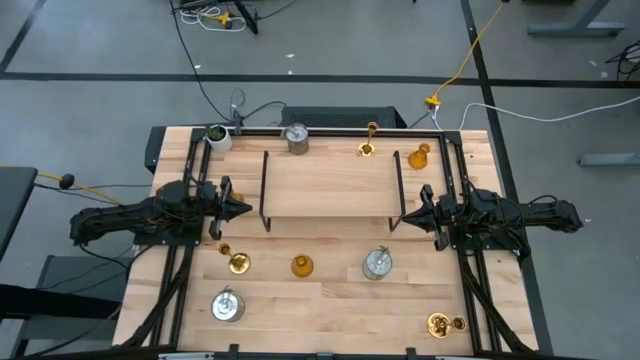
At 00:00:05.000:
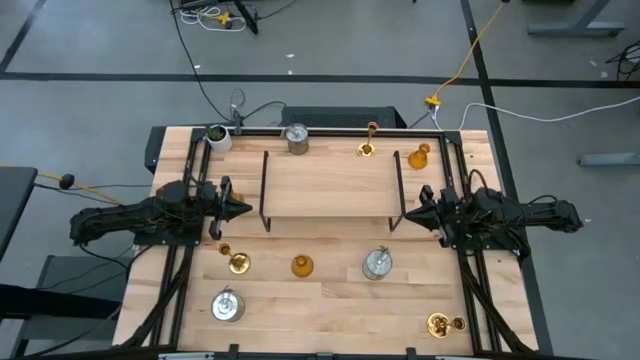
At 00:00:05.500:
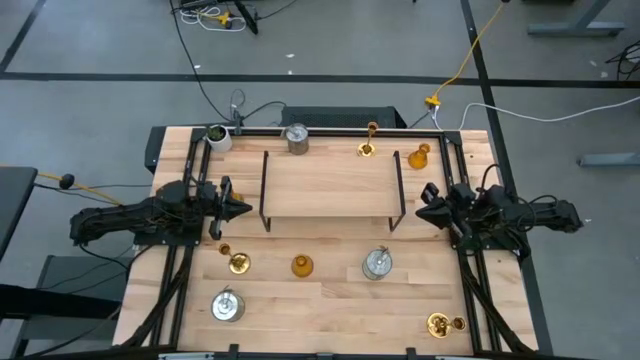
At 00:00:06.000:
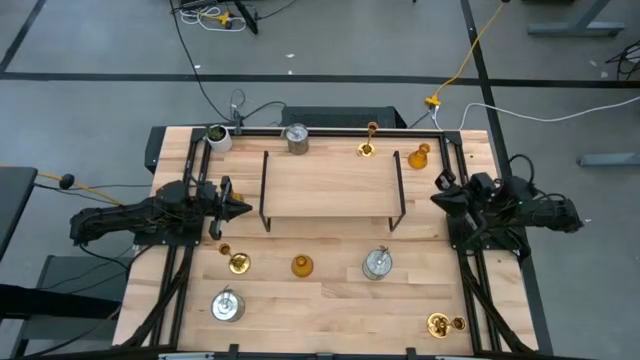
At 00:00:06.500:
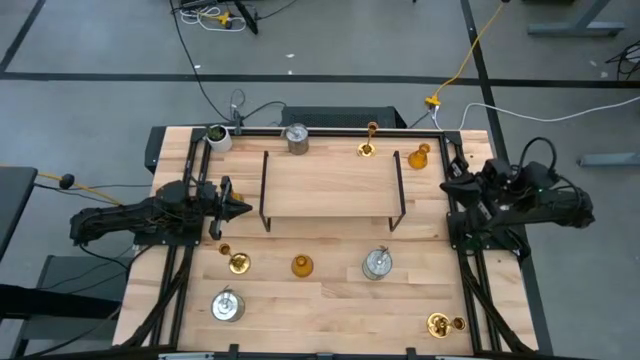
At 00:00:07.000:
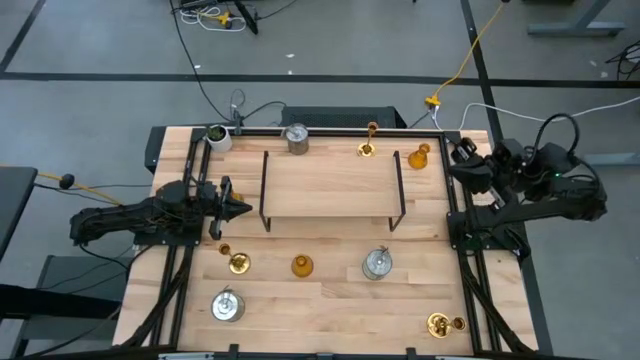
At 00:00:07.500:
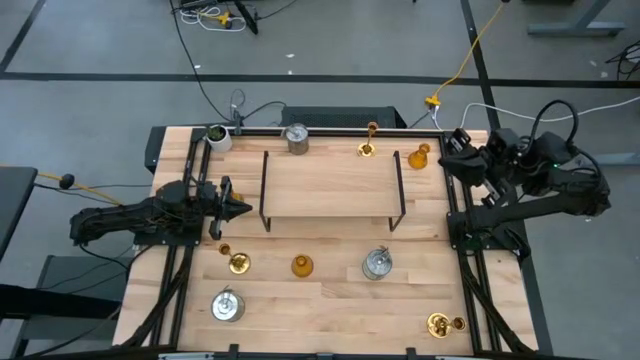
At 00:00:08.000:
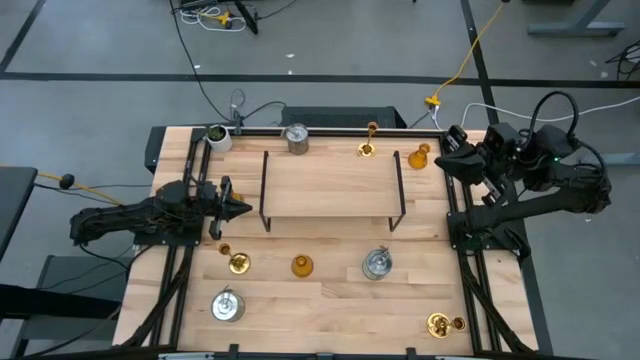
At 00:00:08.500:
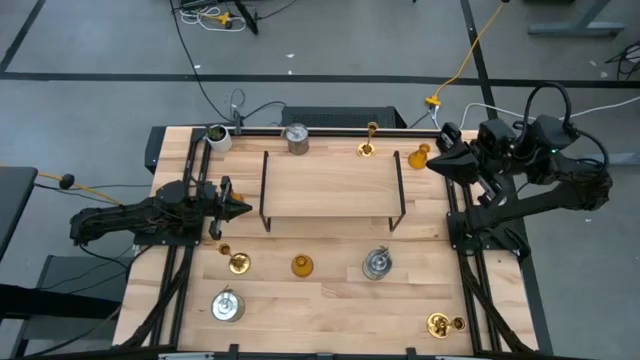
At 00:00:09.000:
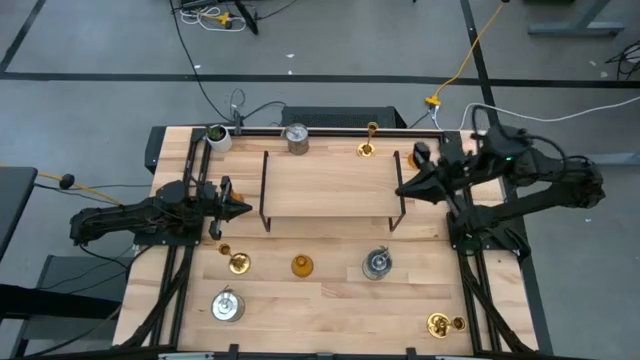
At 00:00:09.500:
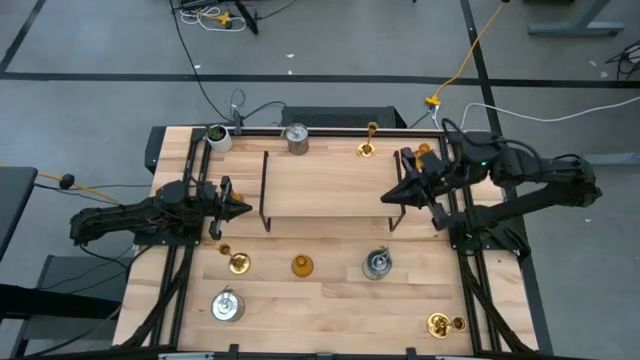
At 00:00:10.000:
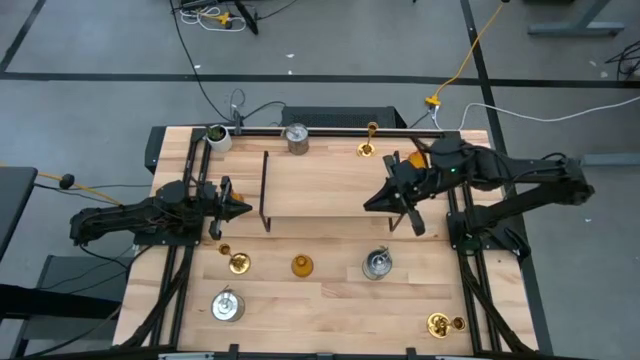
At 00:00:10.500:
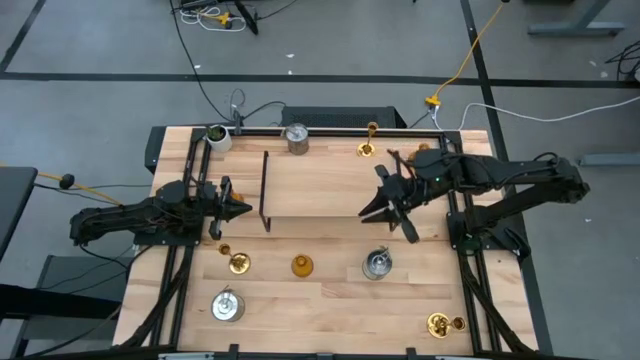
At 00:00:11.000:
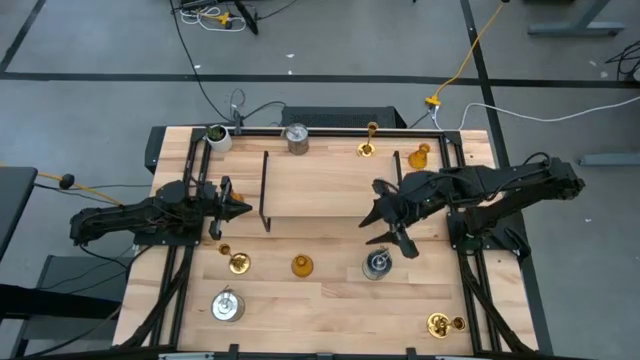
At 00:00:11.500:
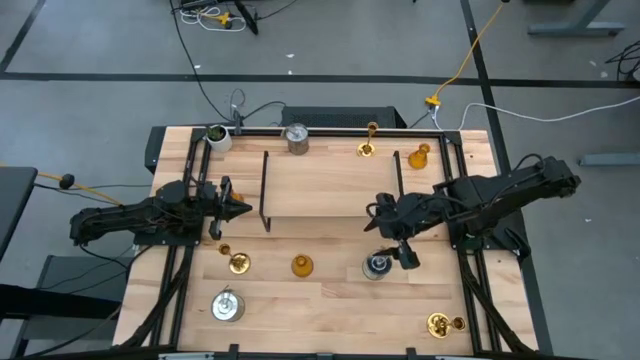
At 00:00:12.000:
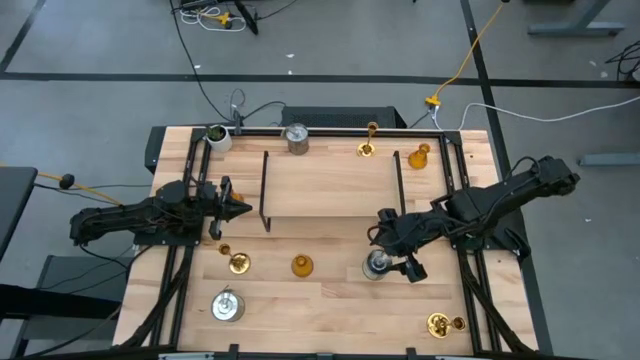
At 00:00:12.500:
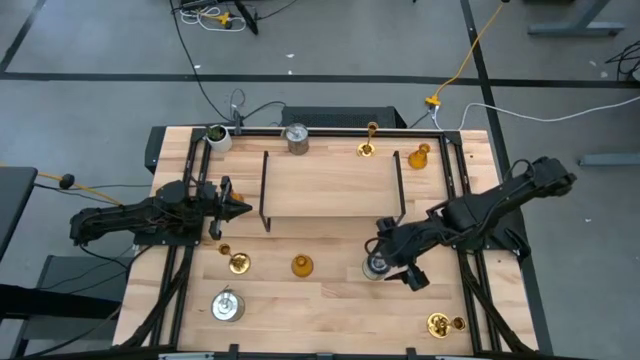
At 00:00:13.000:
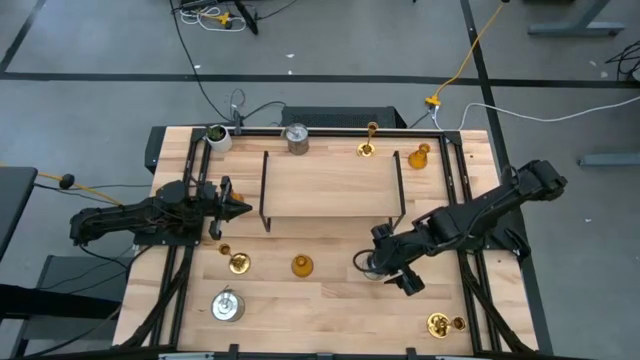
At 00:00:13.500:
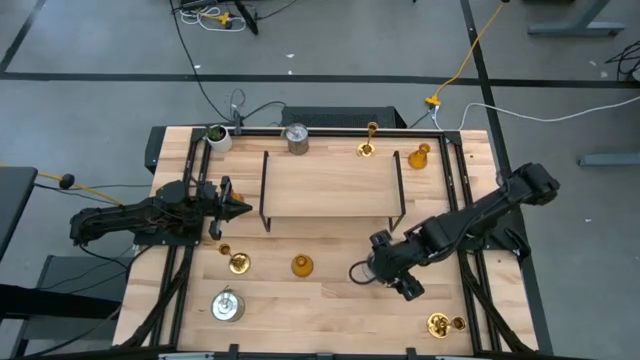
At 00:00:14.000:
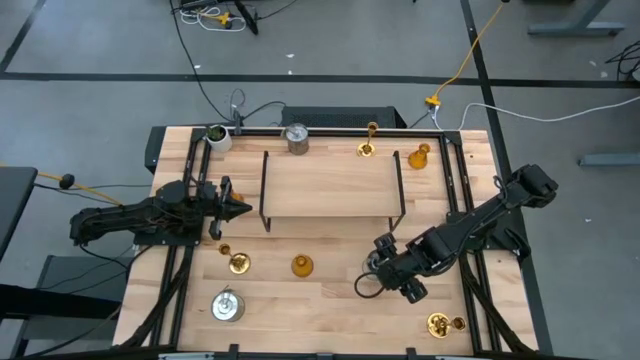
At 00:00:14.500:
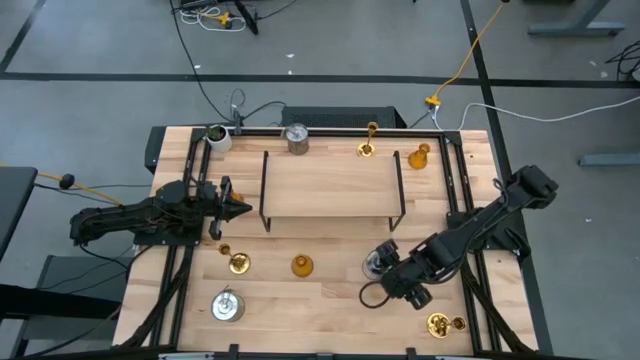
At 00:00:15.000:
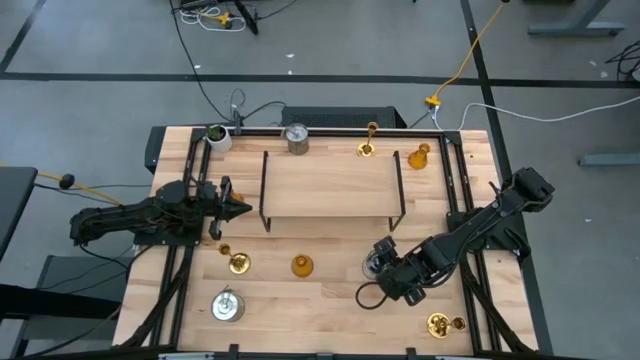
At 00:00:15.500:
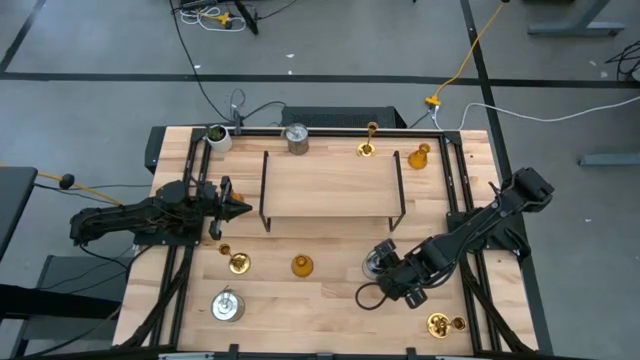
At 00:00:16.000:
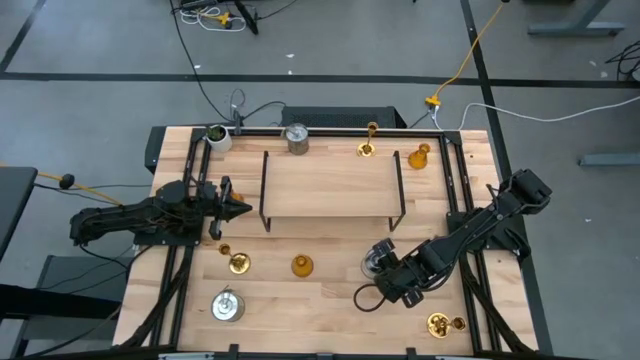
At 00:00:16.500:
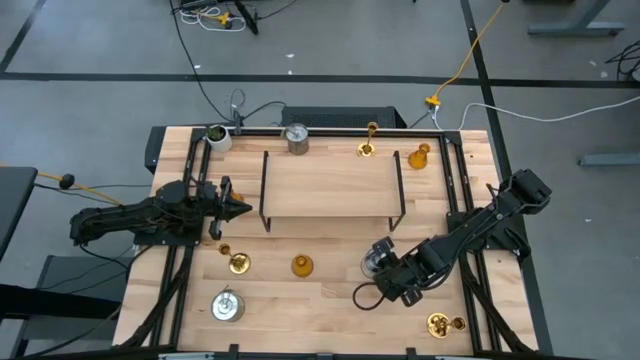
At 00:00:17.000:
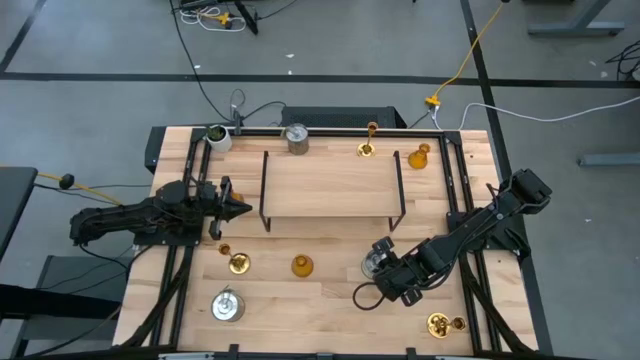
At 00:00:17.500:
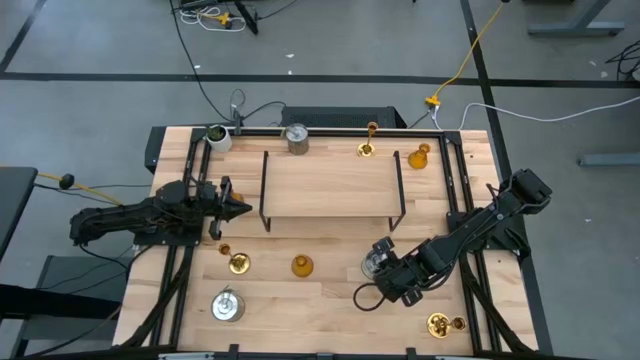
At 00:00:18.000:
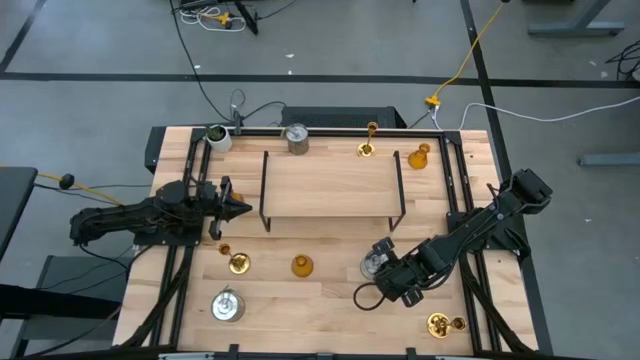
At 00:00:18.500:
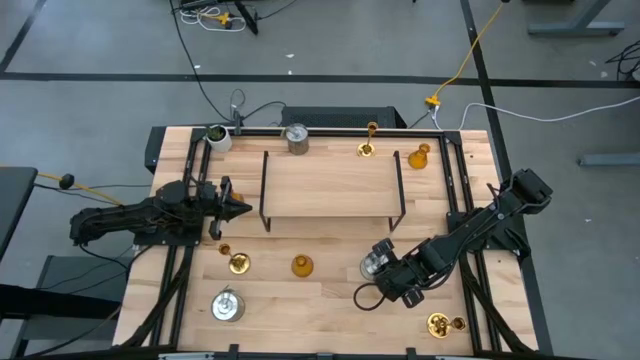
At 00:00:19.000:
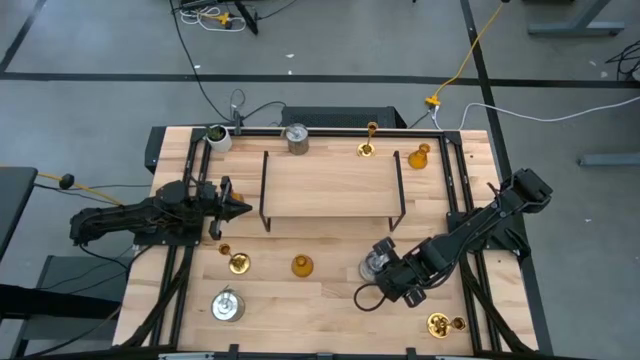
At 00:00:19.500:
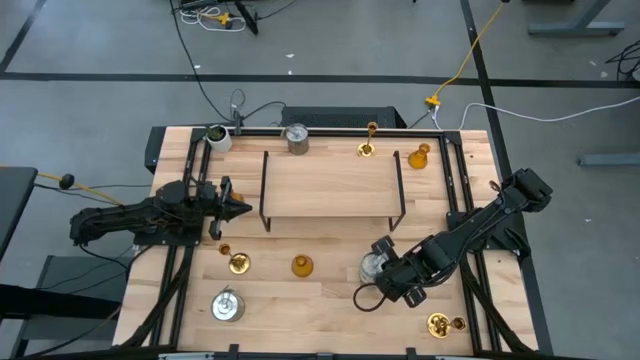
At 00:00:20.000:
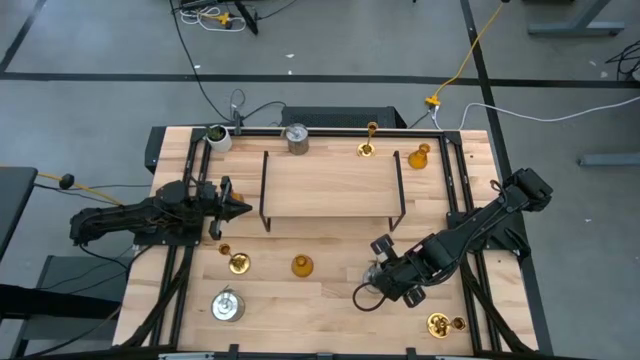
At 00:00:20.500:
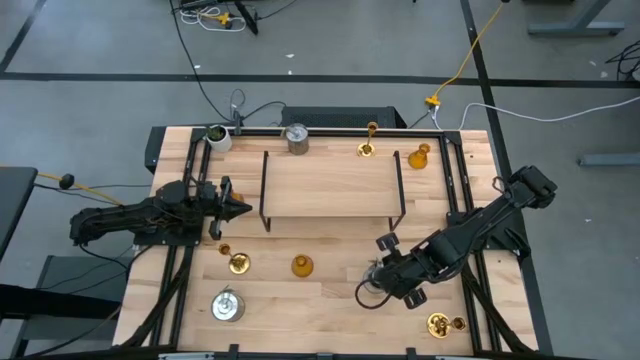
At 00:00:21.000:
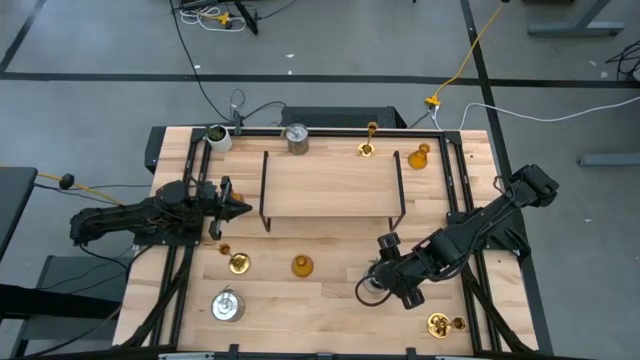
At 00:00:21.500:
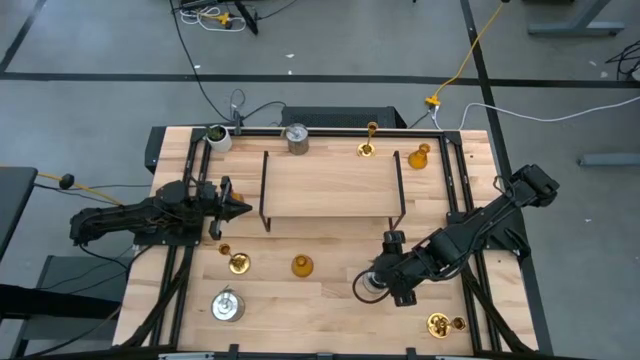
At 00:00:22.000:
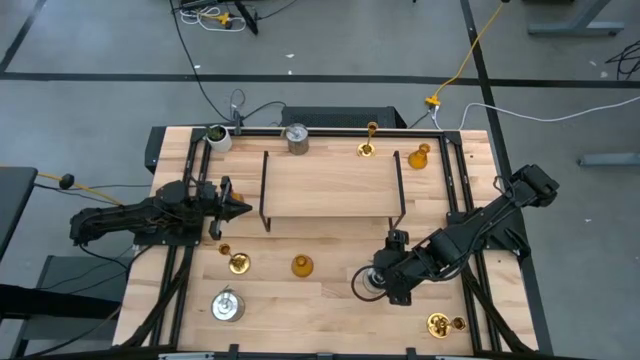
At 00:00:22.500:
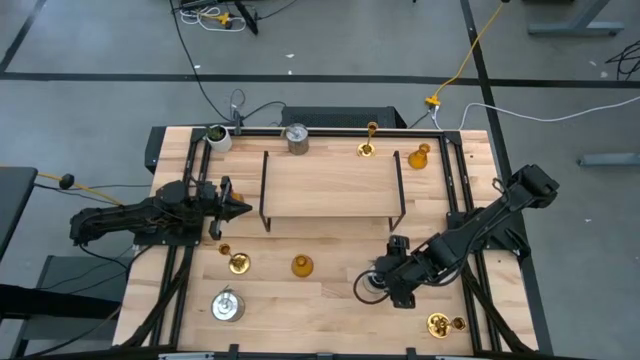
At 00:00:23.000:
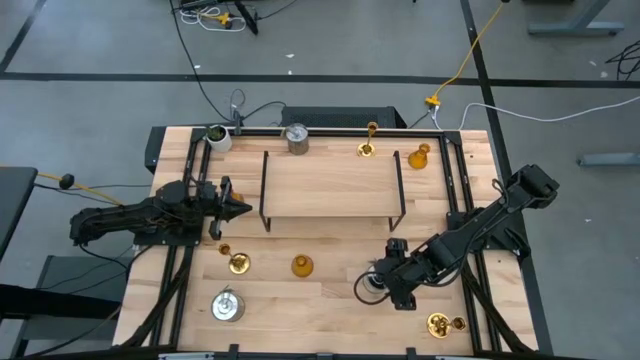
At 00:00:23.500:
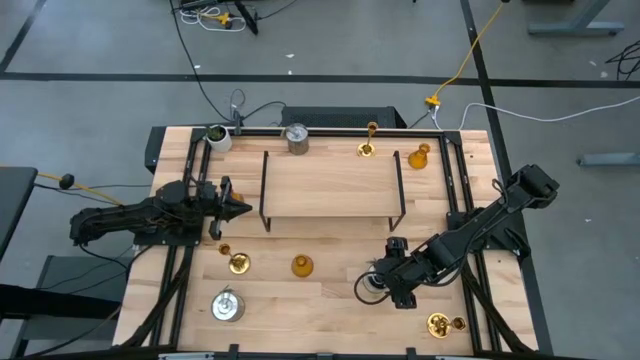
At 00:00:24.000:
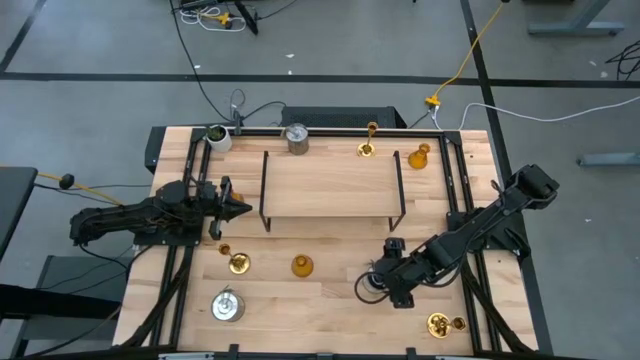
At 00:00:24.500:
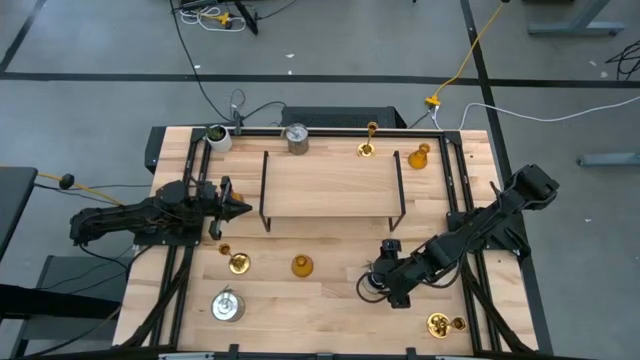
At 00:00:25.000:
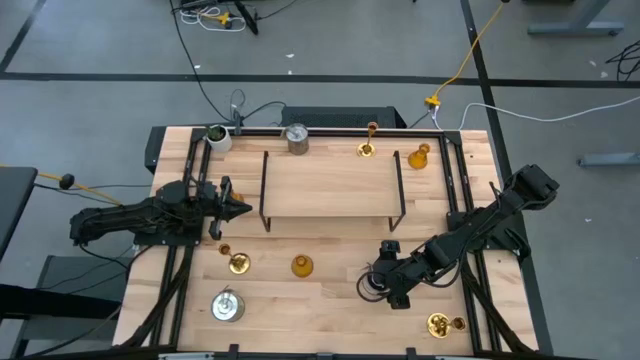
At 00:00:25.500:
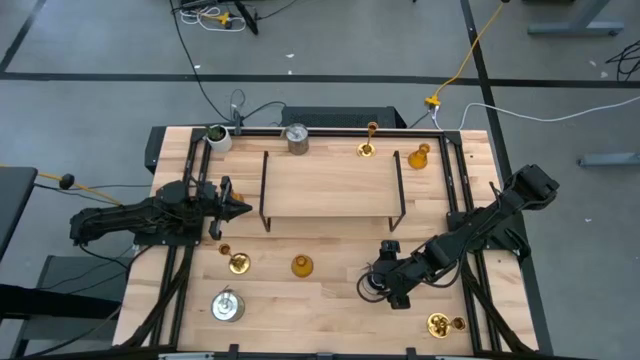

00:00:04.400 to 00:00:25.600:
Task: Pick & Place candle stick holders
Put the right scented candle on the shelf
